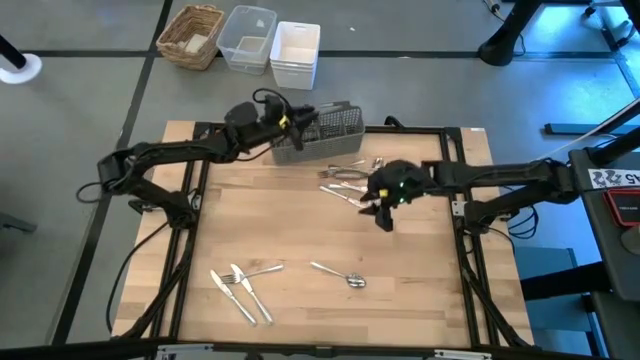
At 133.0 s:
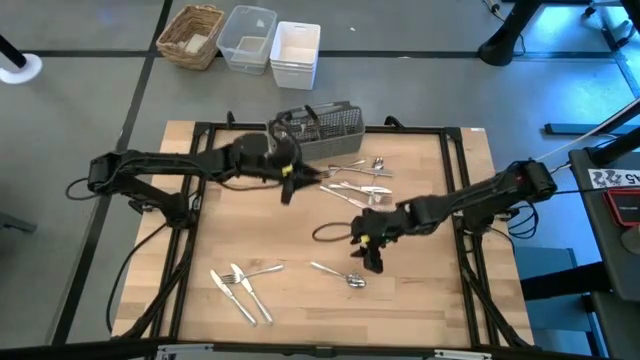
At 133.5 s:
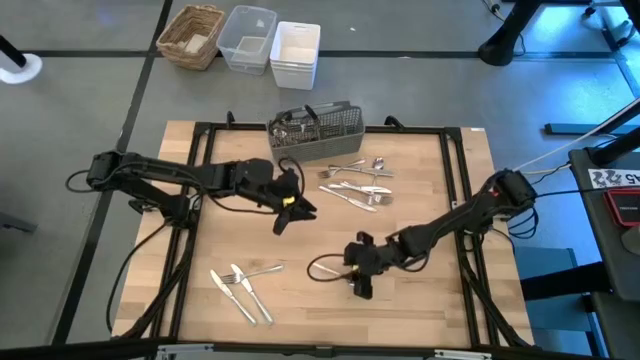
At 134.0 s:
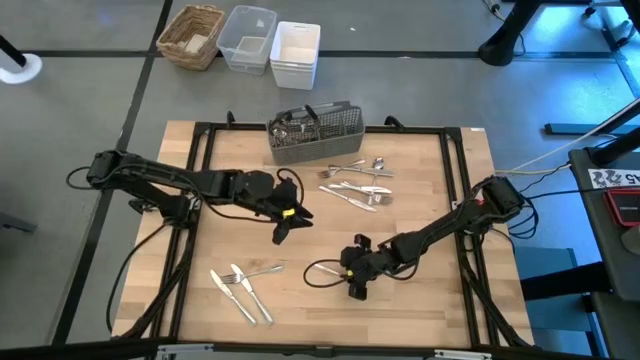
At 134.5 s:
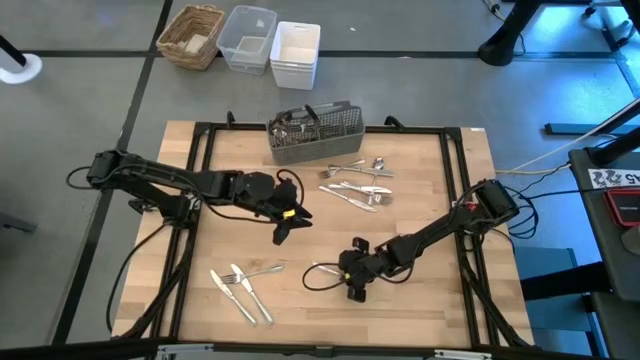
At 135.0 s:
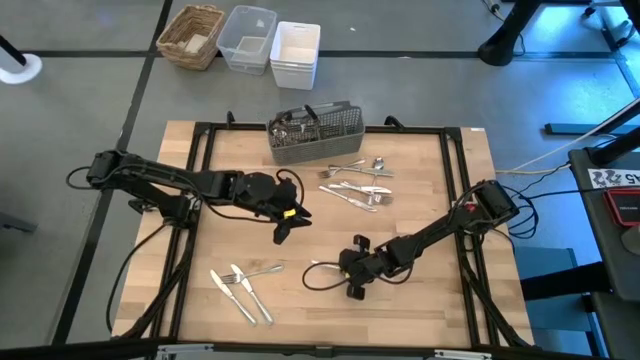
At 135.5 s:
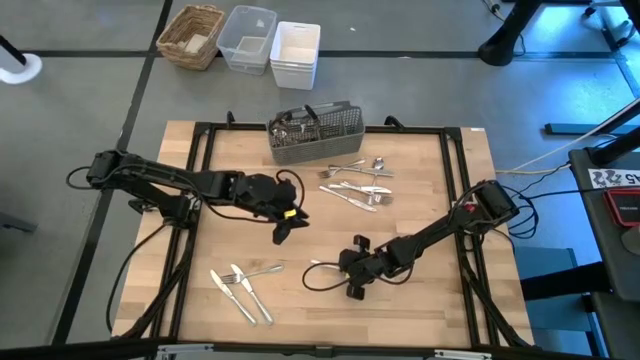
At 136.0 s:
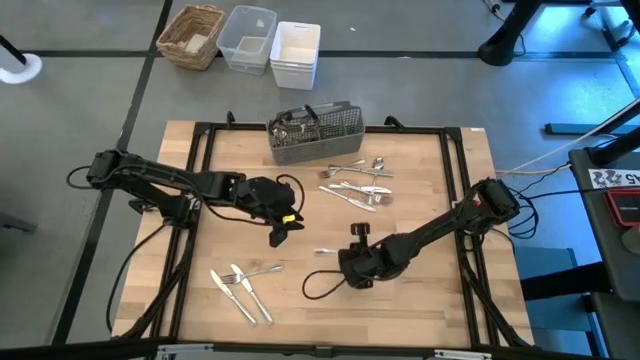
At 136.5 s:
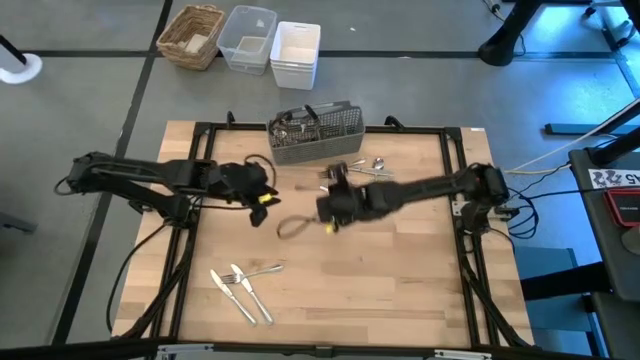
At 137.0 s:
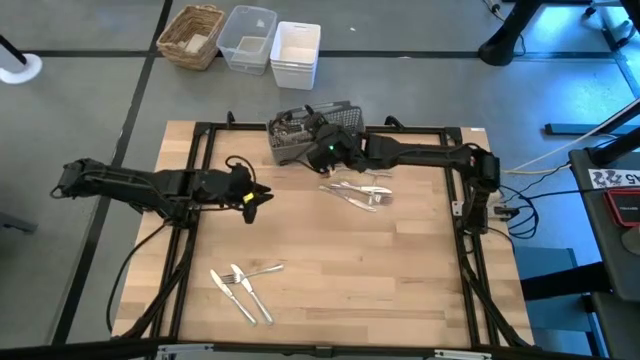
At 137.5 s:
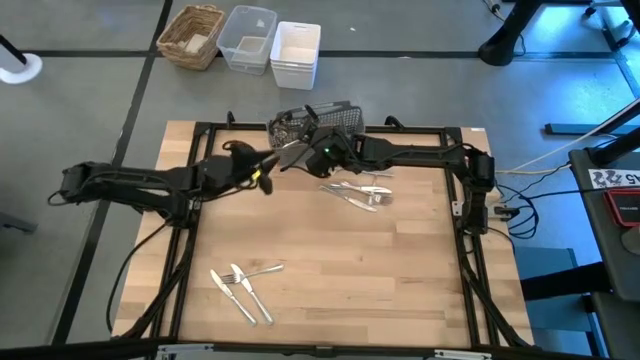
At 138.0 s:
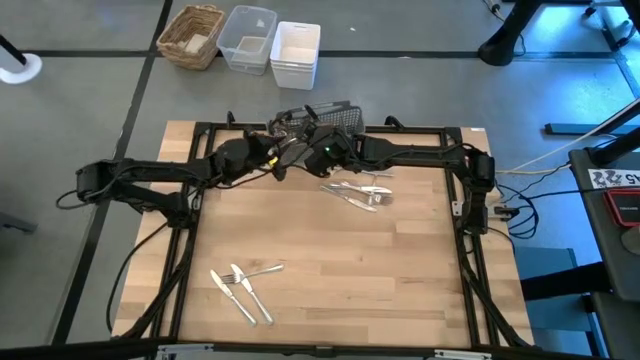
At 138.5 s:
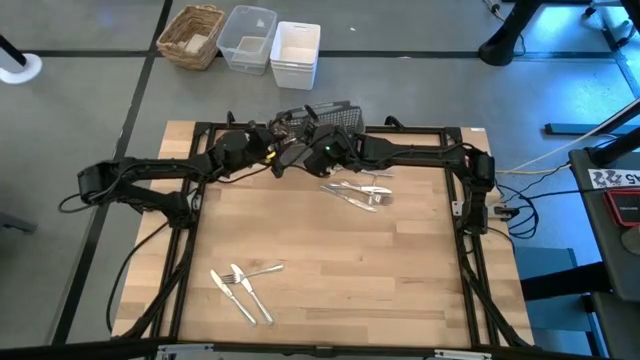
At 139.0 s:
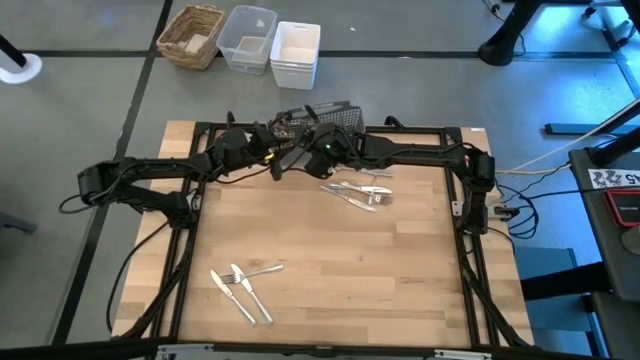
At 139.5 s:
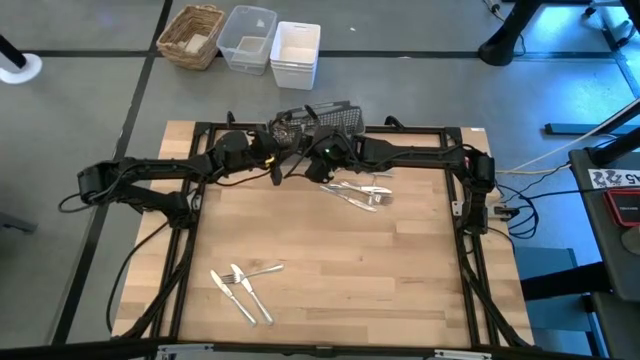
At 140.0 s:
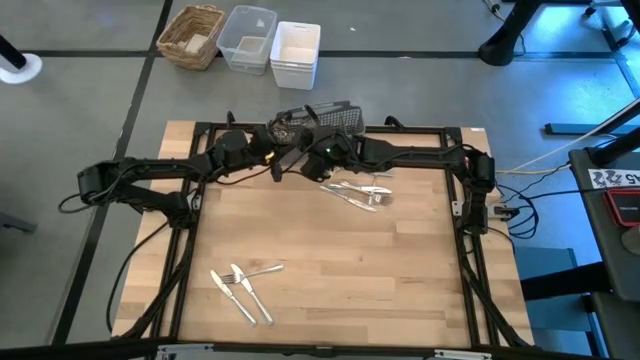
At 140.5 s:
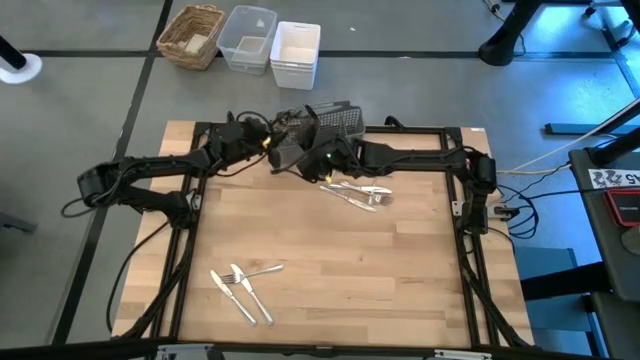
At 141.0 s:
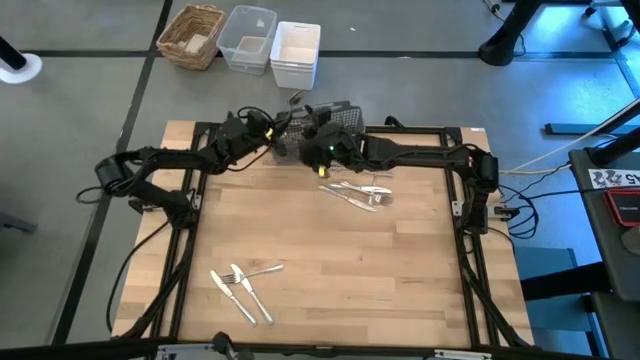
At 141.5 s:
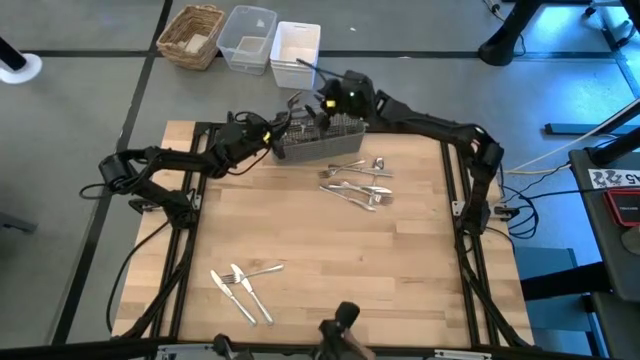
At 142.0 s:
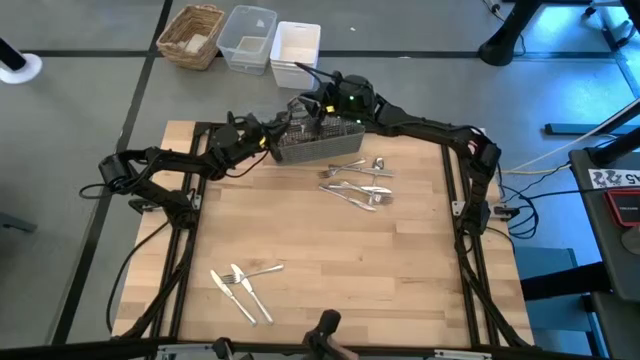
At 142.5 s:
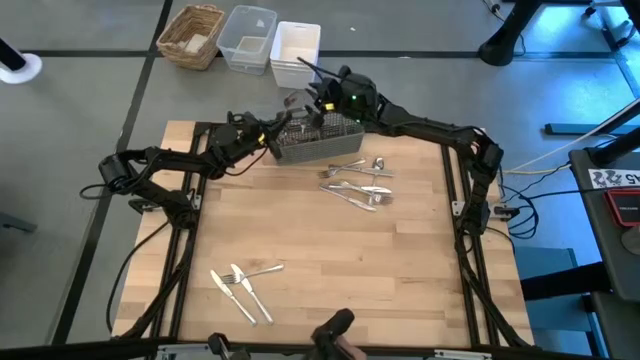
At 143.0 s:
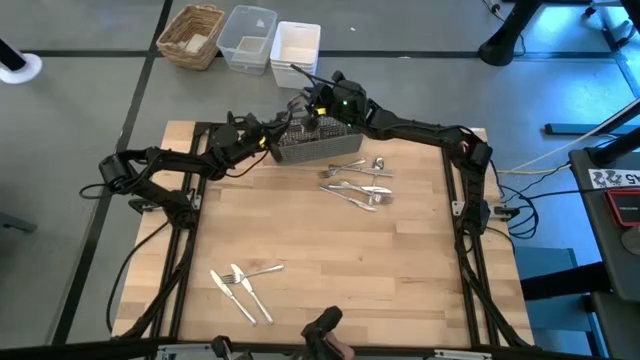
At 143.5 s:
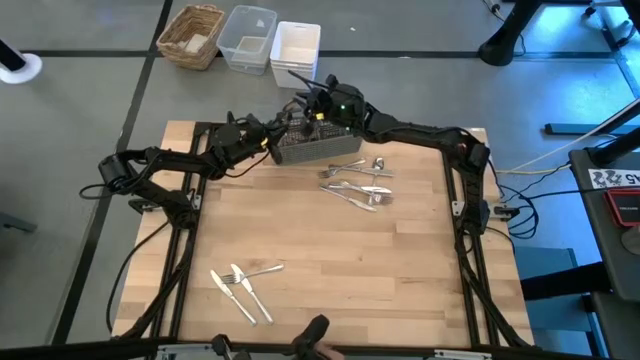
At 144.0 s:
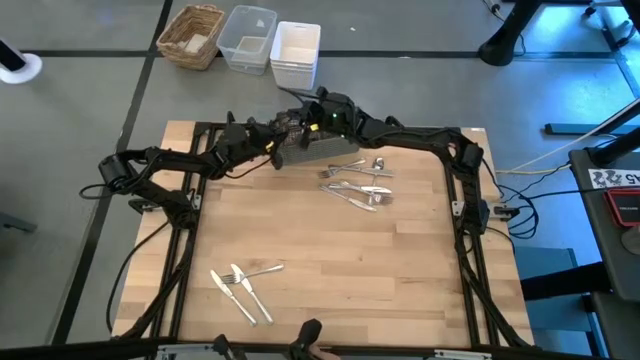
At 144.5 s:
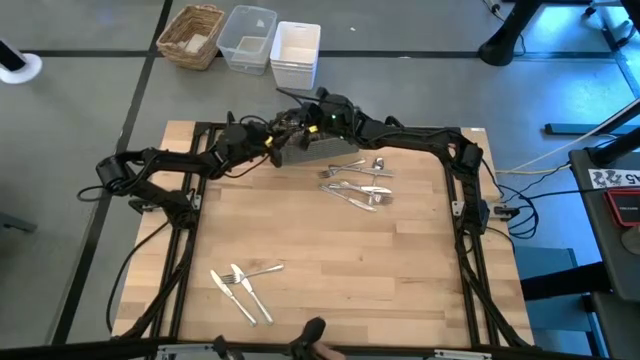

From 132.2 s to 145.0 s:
Task: Sort silverware
Put the silver spoon into the silverware rack

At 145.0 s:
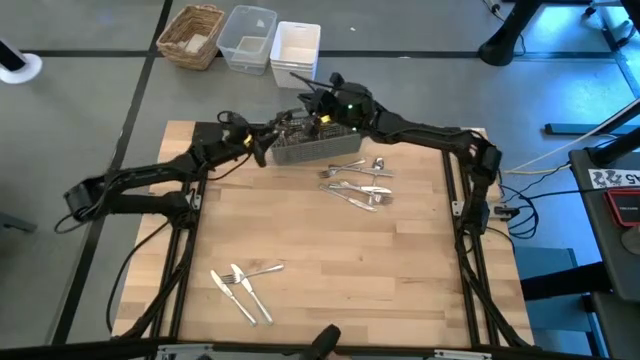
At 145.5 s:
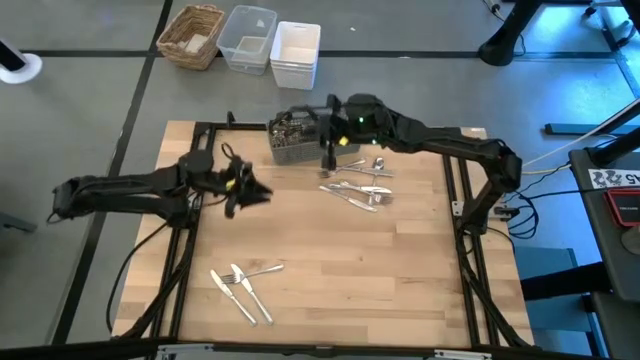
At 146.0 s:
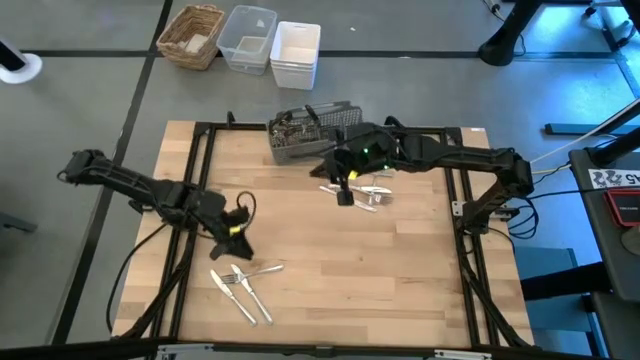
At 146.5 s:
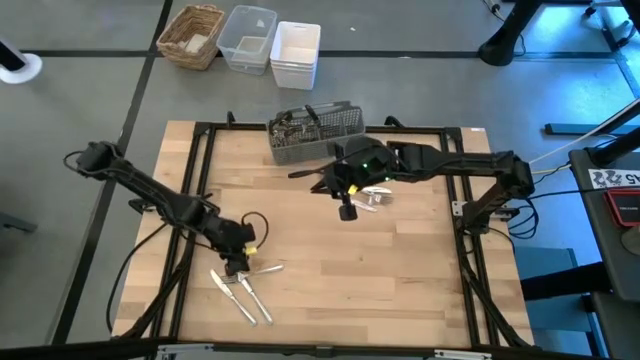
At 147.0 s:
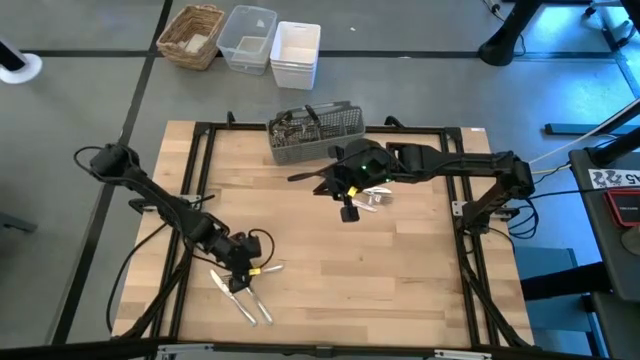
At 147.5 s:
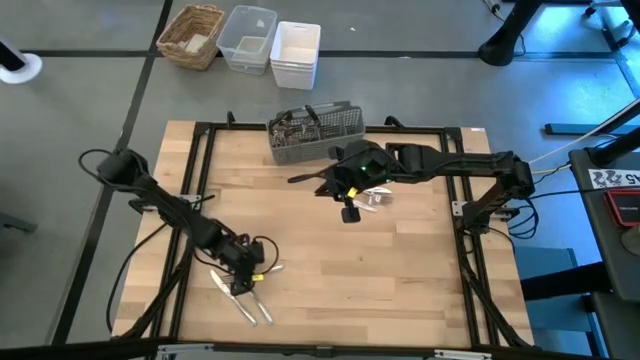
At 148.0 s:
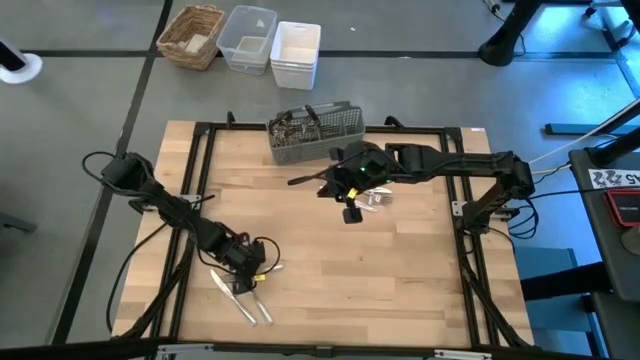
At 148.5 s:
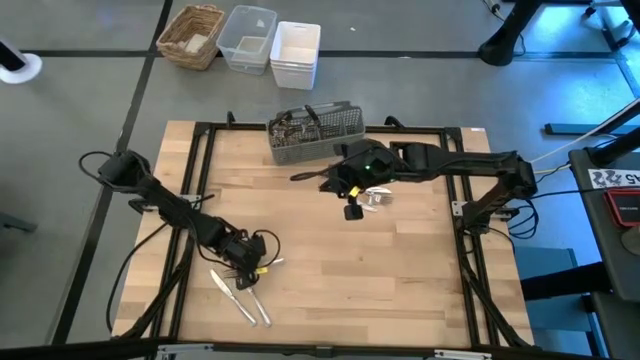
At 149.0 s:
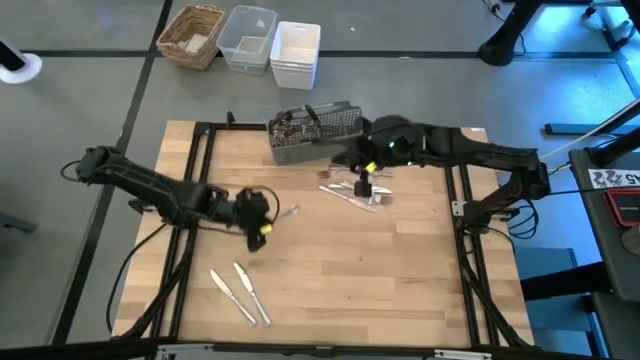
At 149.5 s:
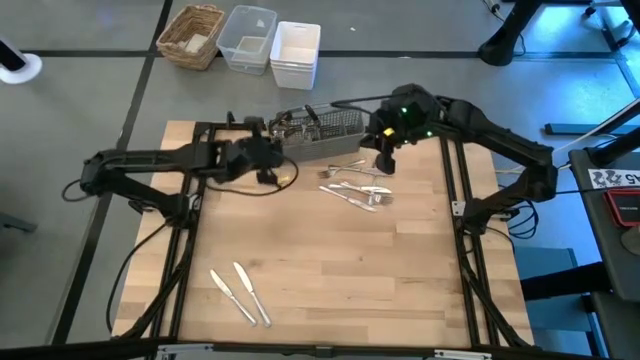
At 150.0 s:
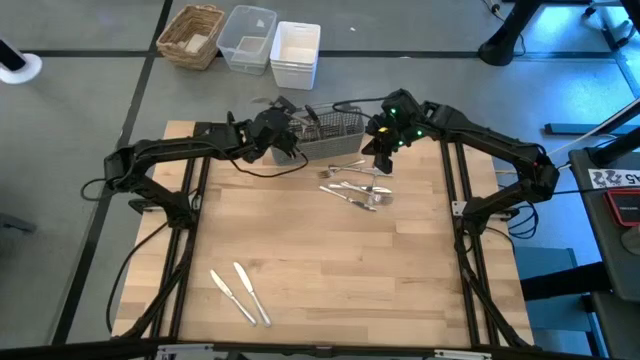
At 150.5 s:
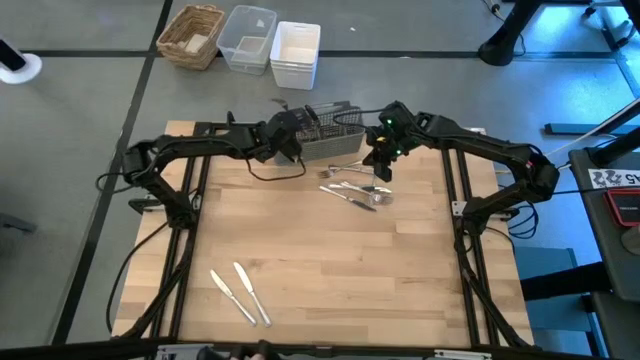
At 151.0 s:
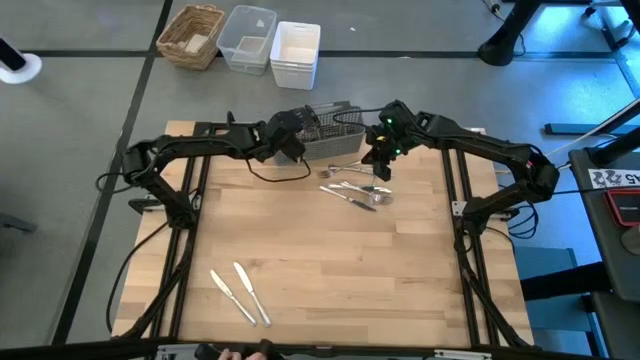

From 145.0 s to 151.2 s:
Put the silver fork into the silverware rack

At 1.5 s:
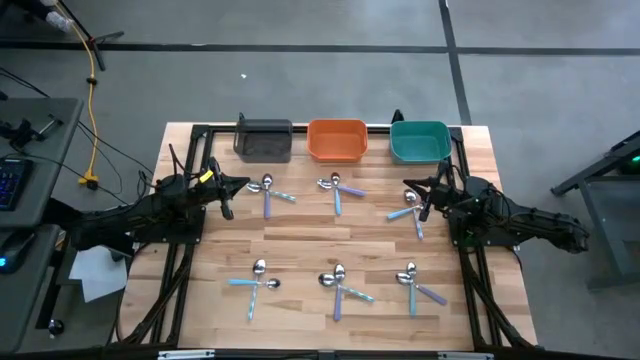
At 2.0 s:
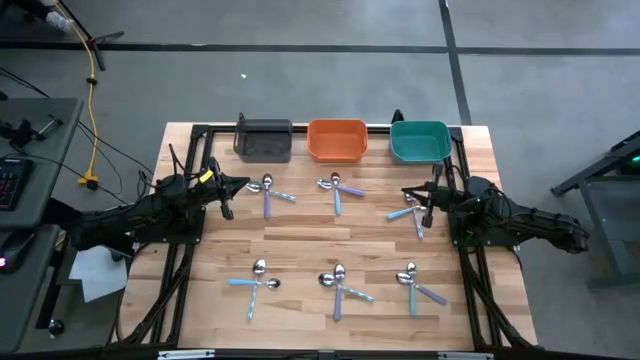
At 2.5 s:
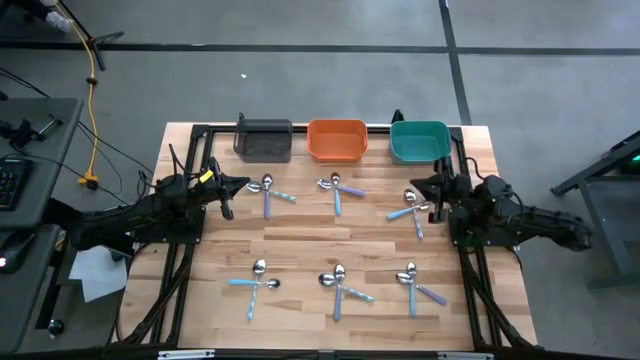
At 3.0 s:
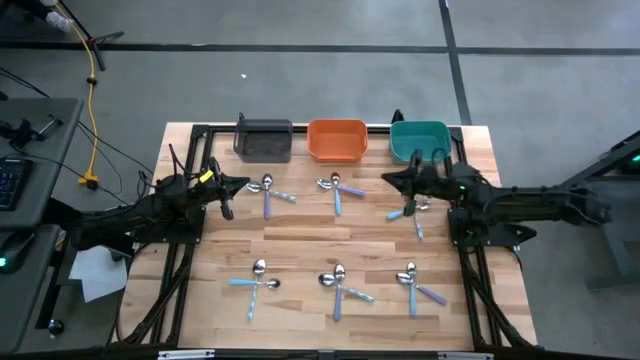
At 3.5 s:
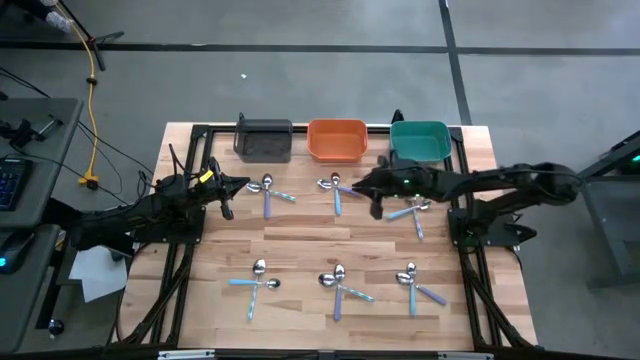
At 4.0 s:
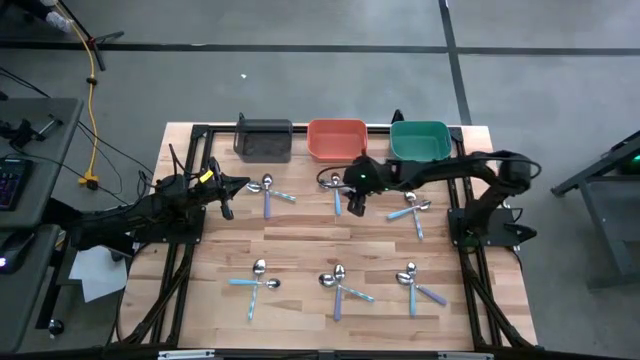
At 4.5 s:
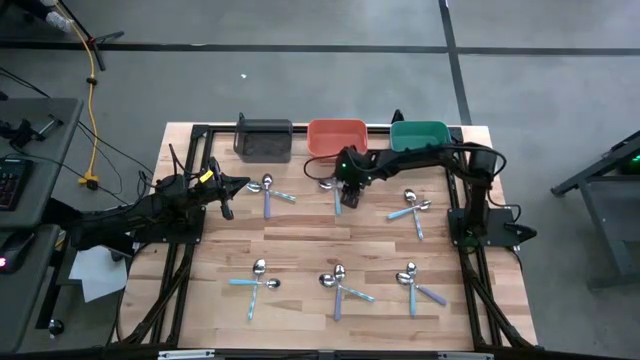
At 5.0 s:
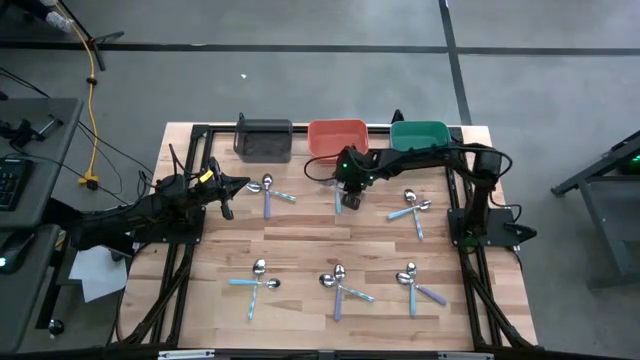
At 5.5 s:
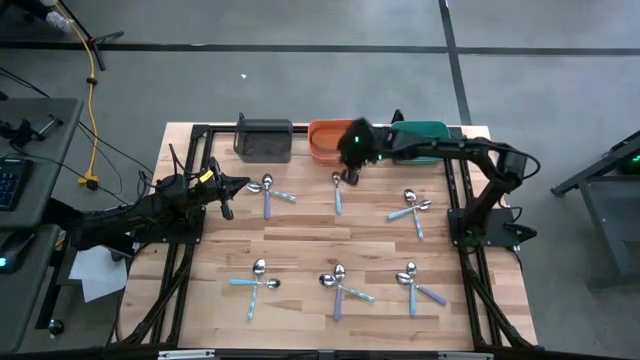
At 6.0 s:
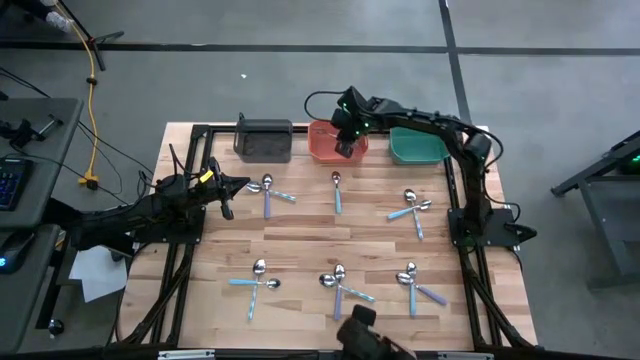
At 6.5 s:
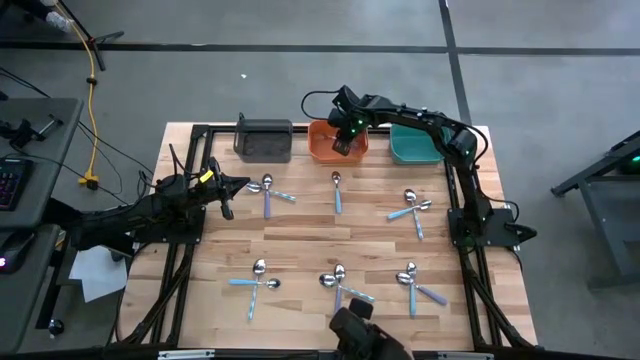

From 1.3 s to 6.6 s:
Task: Sort silverware by color (type)
Put the purple spoon into the orange bin
